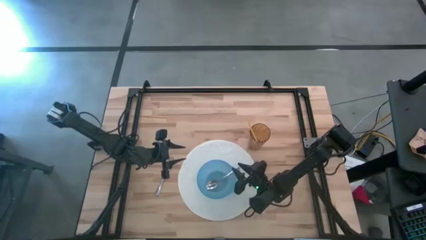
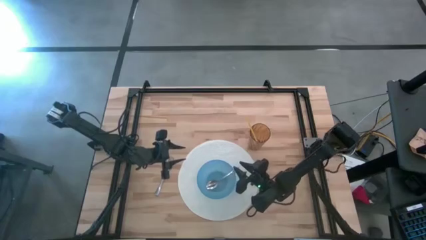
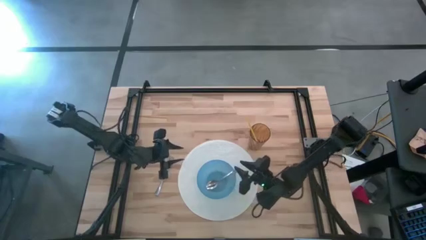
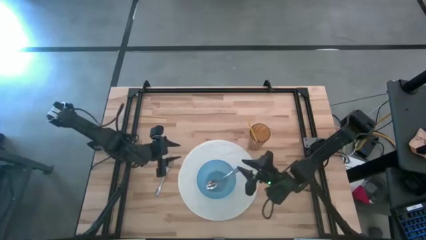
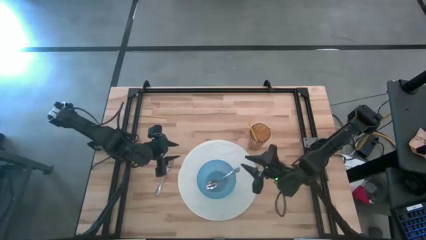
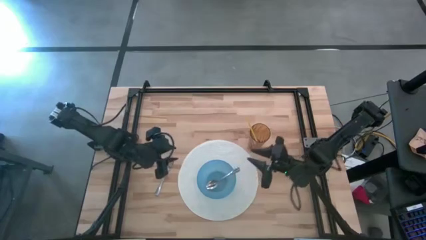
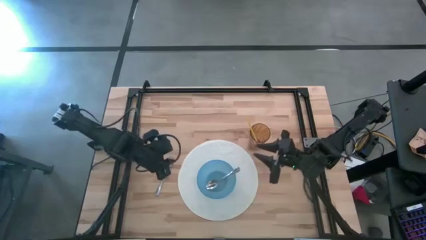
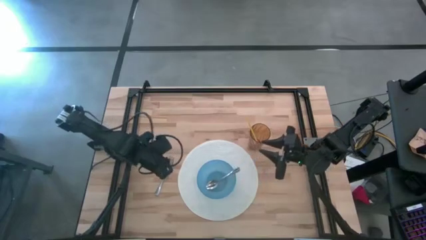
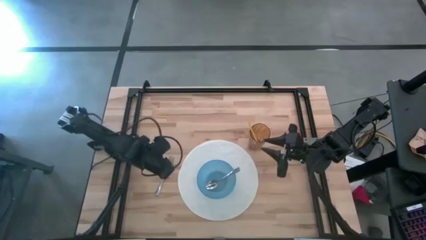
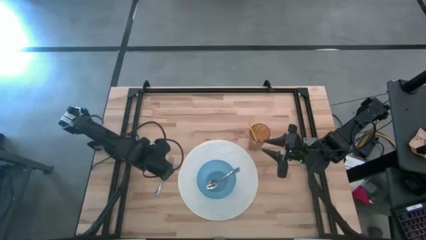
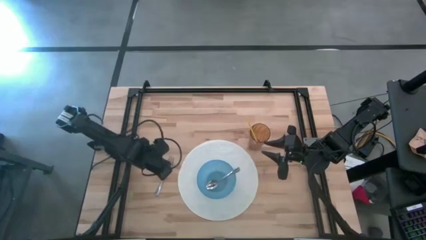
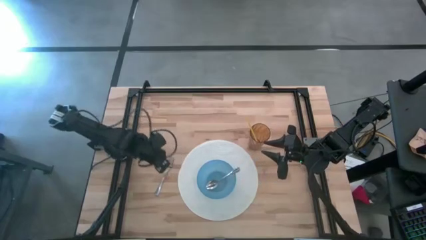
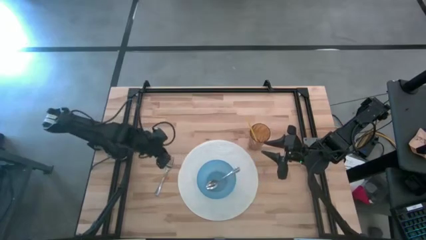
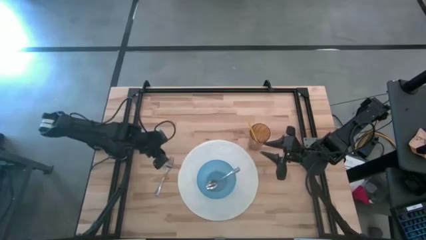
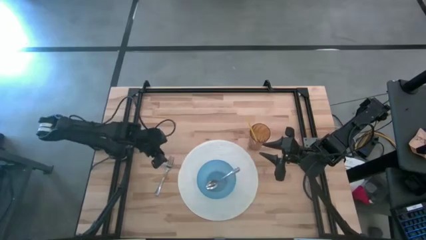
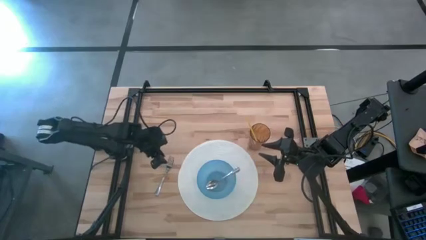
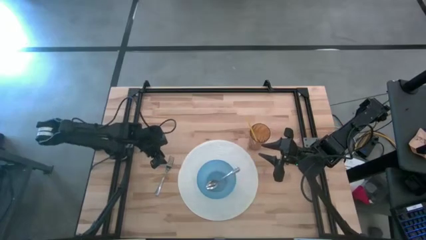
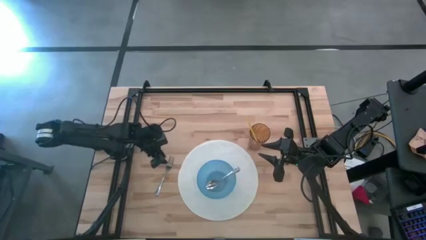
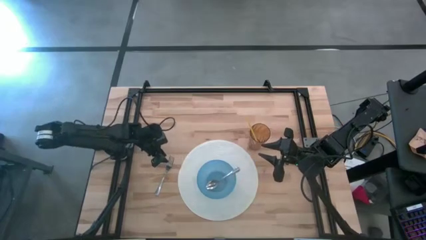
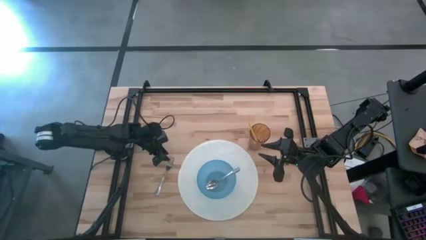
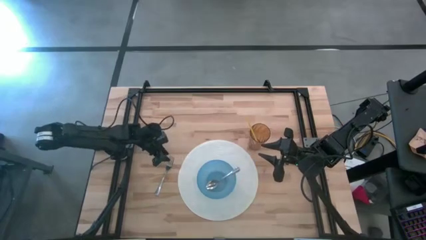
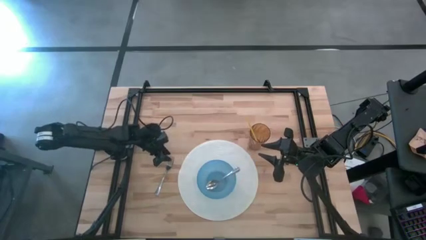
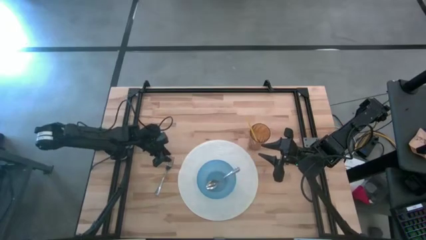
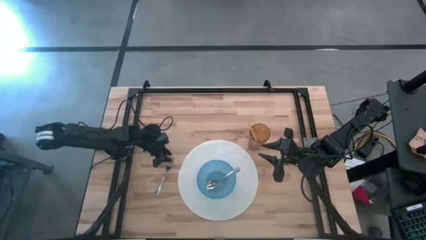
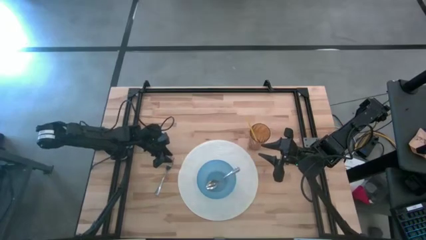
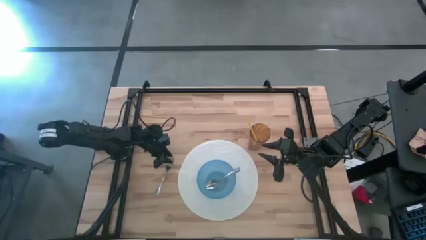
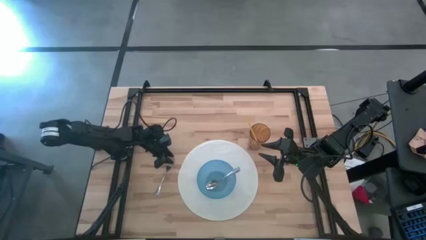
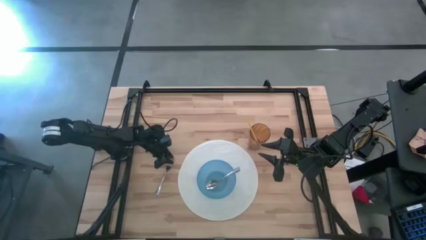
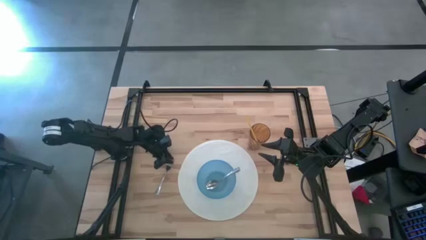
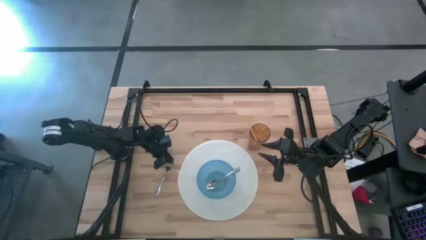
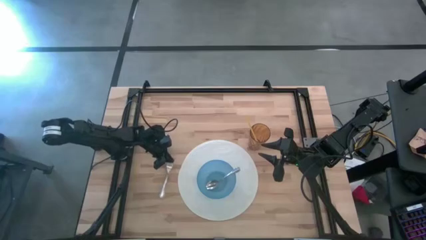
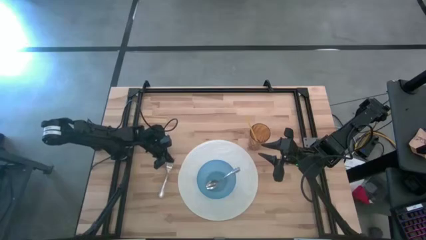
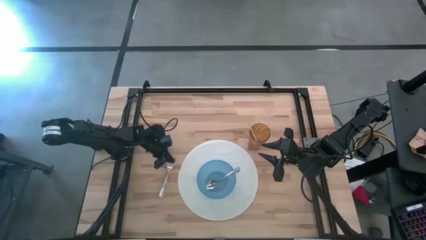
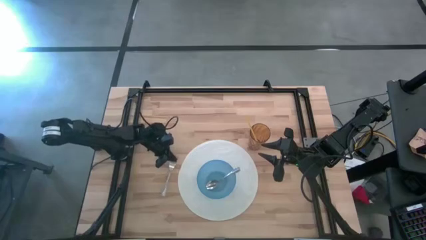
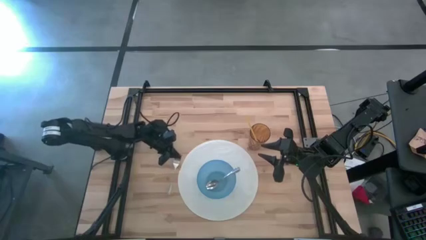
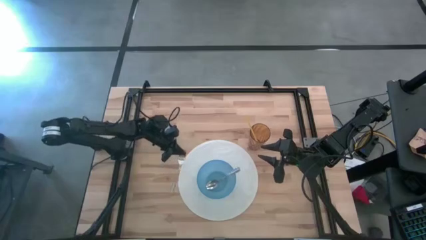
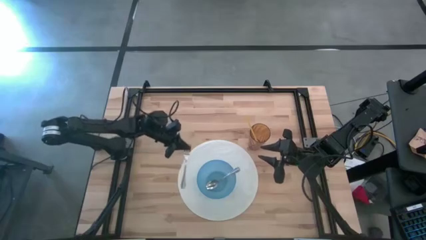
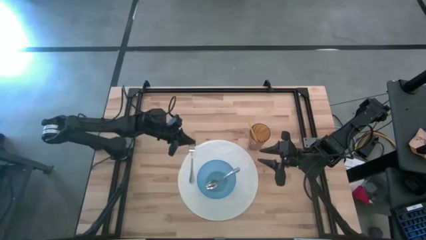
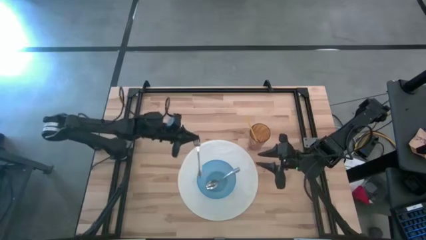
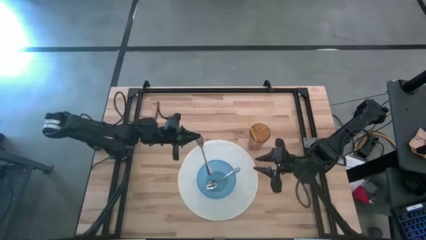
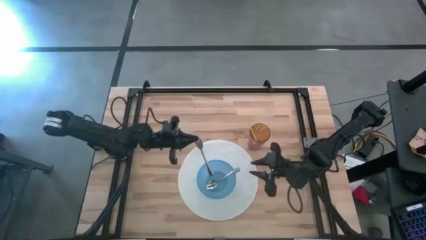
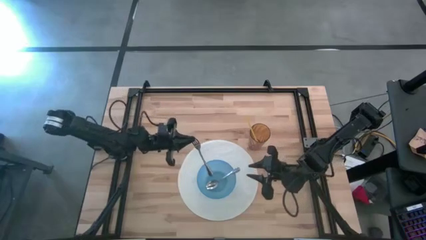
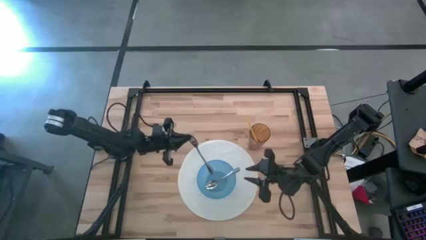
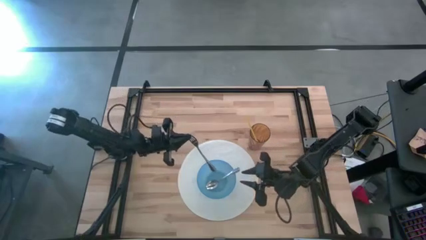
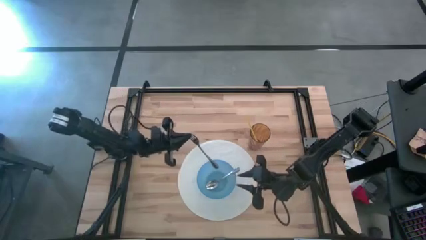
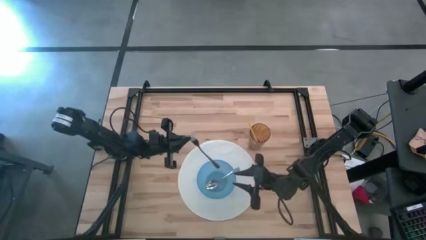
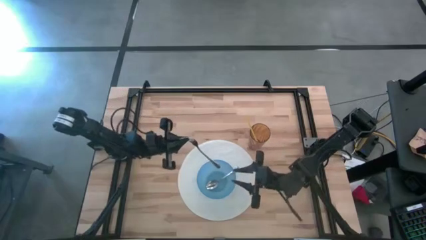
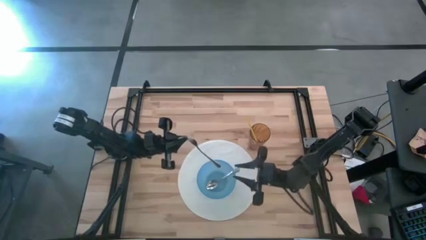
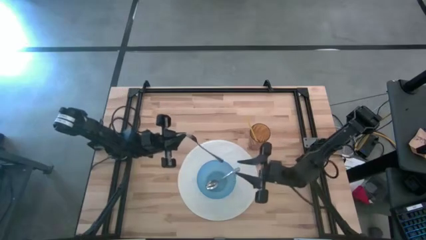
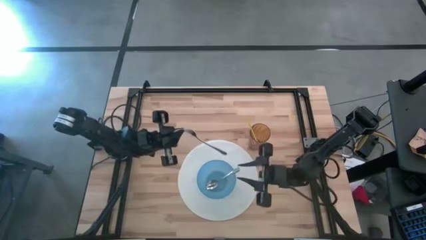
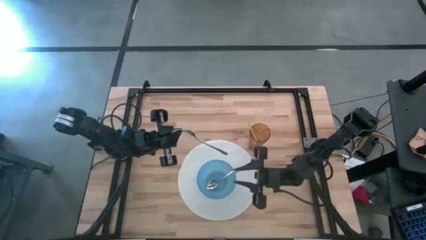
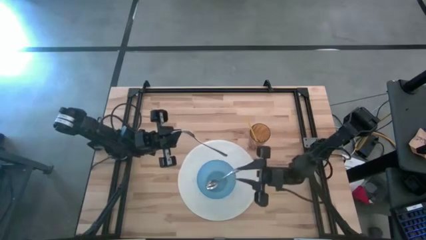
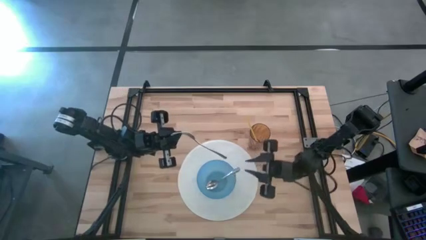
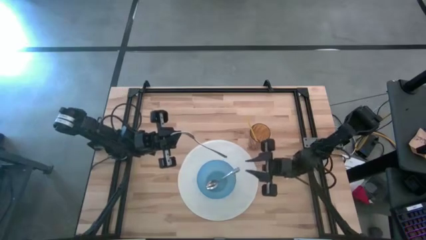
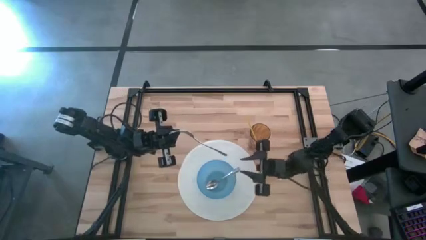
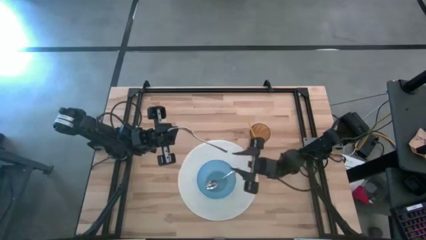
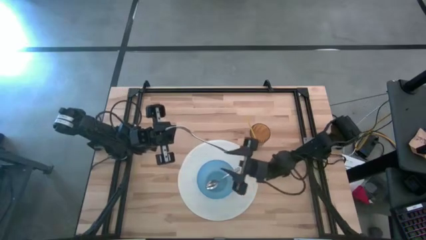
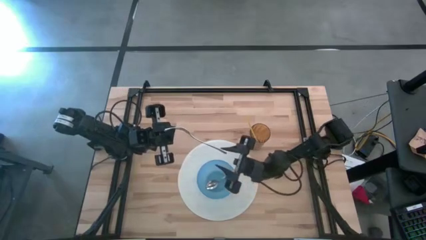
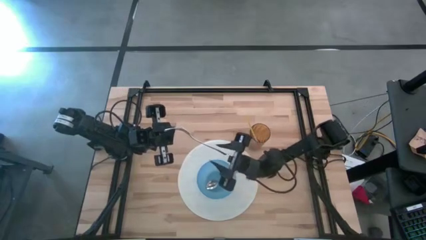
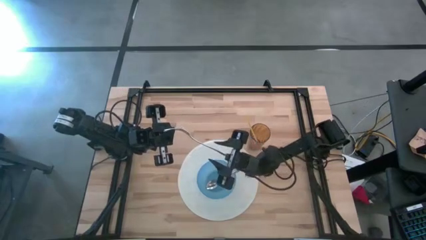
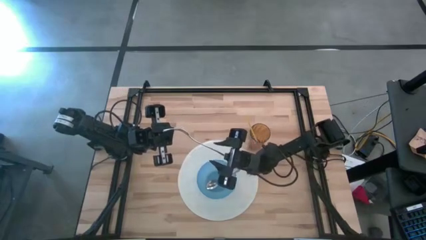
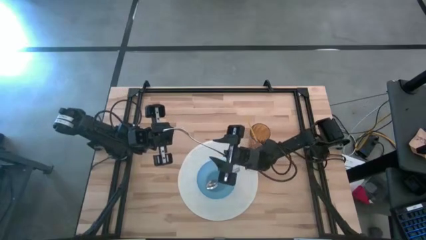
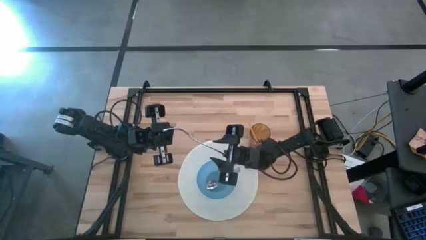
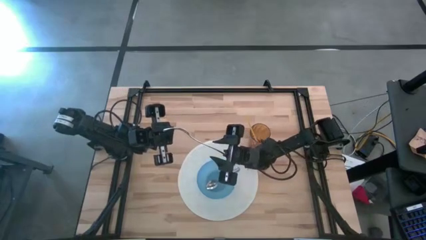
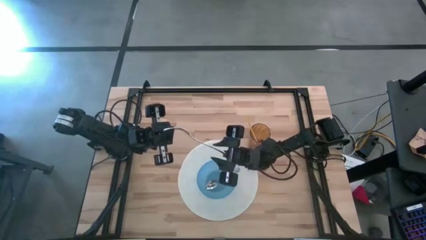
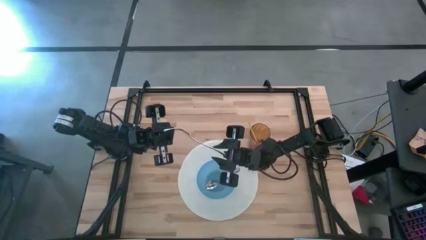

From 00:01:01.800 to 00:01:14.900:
Task: Pick & Place Utensil
Put the silver fork into the blue bowl on the white mat
